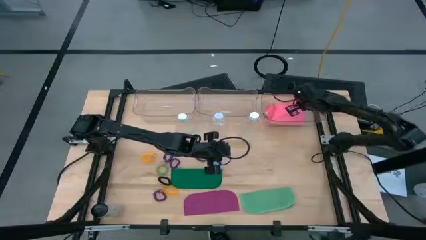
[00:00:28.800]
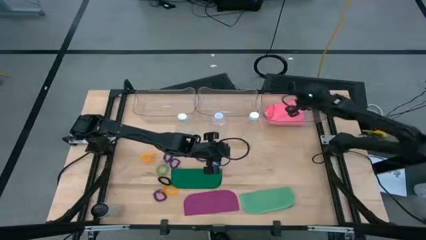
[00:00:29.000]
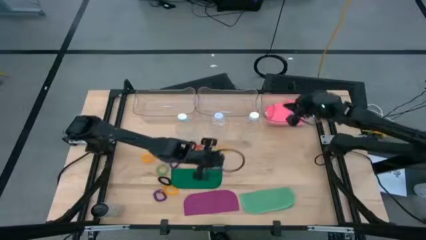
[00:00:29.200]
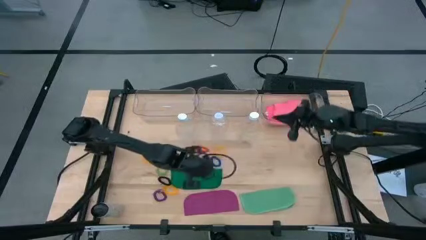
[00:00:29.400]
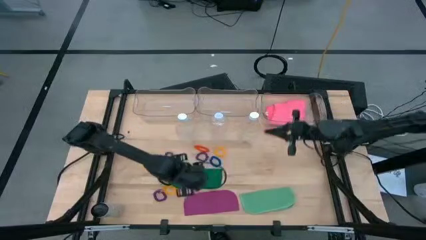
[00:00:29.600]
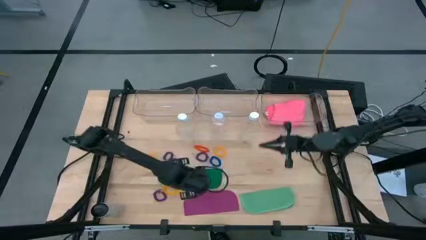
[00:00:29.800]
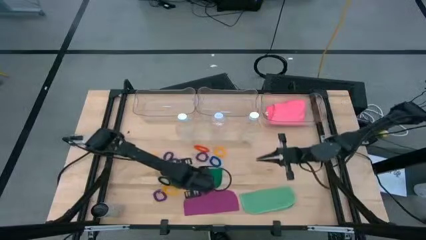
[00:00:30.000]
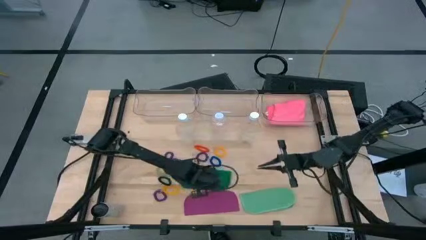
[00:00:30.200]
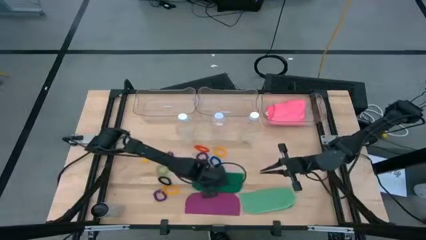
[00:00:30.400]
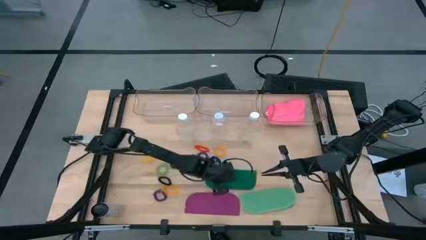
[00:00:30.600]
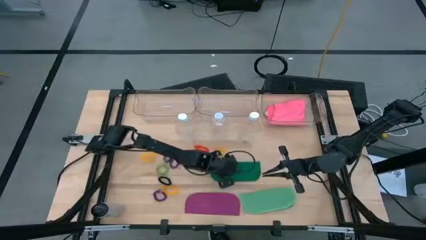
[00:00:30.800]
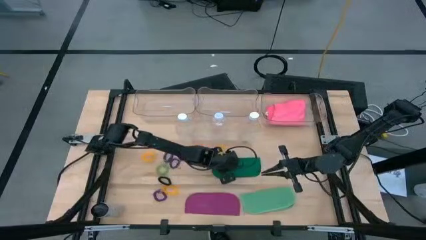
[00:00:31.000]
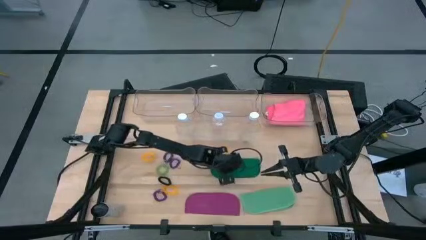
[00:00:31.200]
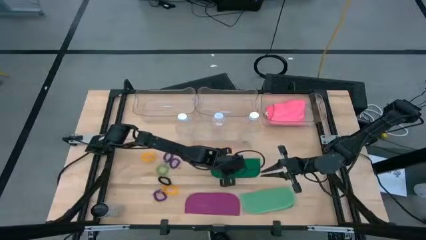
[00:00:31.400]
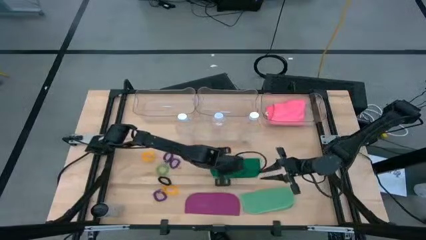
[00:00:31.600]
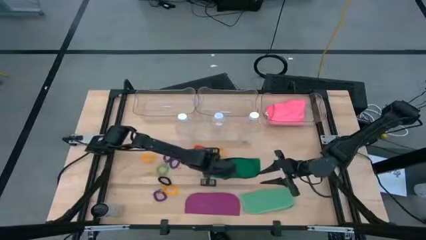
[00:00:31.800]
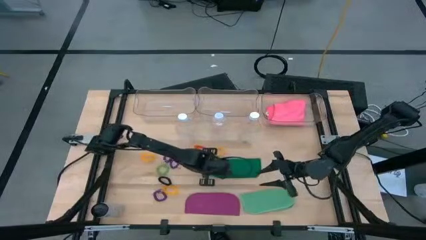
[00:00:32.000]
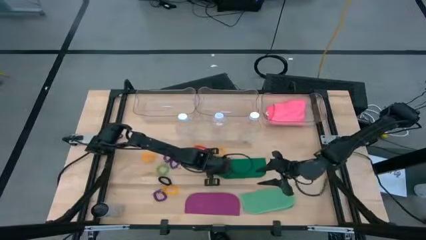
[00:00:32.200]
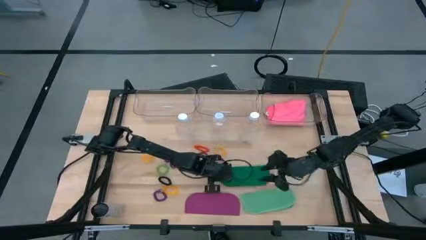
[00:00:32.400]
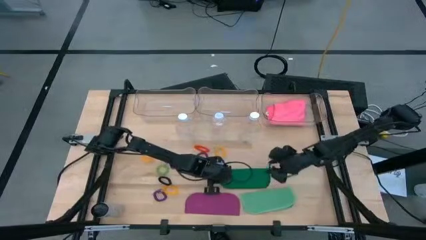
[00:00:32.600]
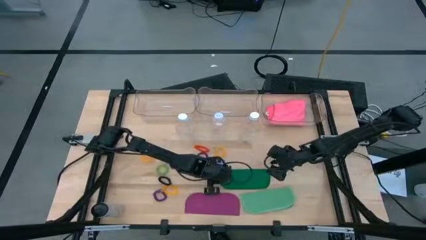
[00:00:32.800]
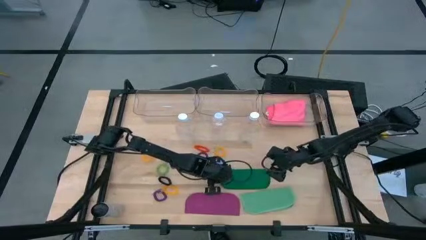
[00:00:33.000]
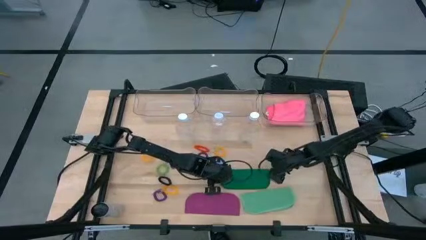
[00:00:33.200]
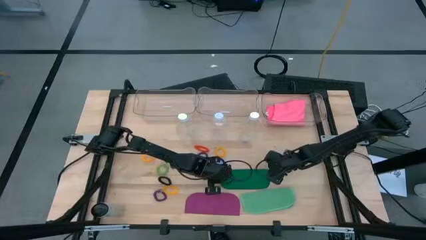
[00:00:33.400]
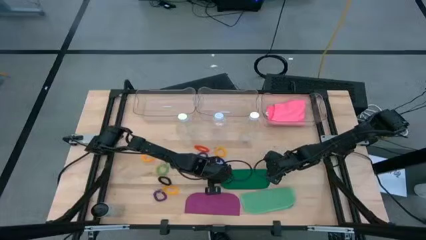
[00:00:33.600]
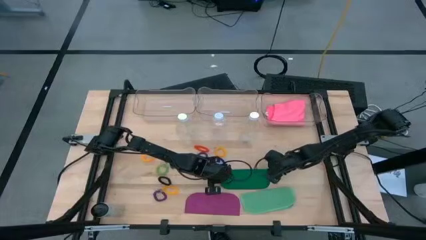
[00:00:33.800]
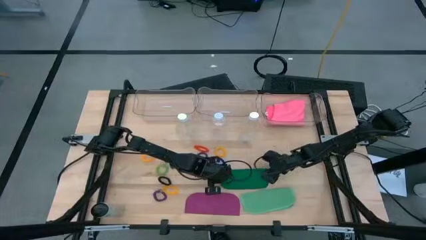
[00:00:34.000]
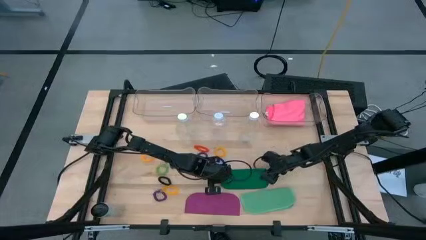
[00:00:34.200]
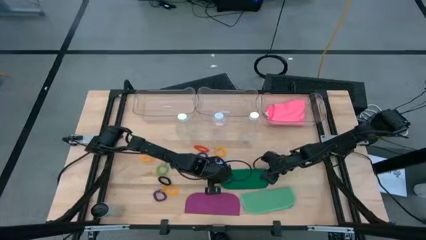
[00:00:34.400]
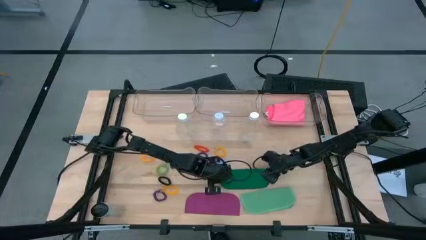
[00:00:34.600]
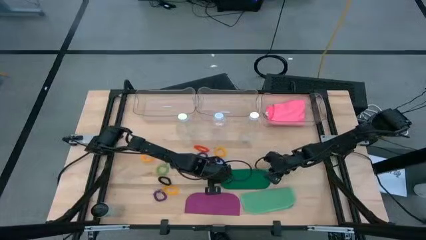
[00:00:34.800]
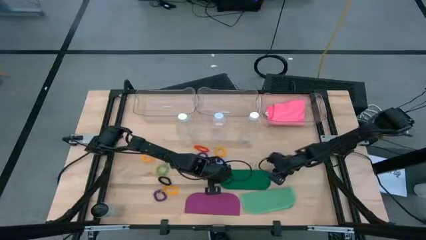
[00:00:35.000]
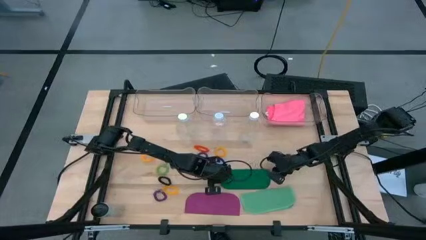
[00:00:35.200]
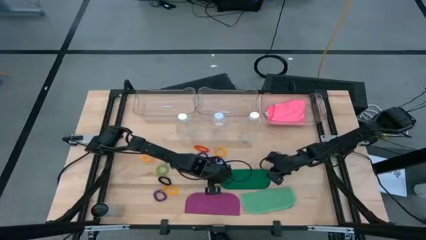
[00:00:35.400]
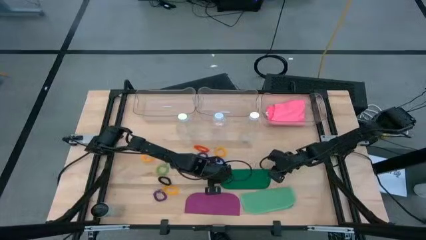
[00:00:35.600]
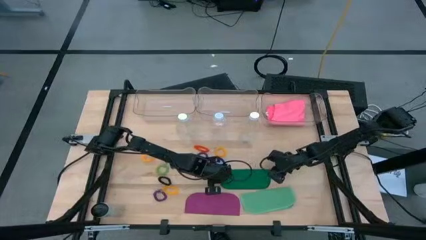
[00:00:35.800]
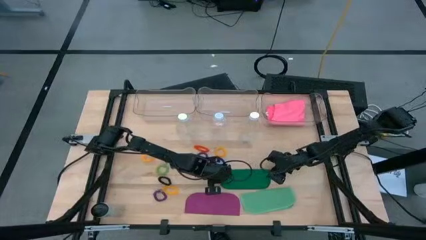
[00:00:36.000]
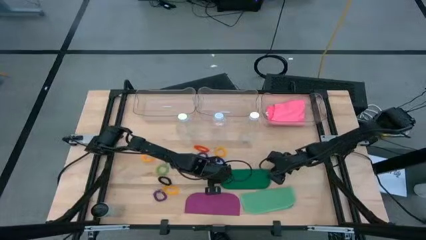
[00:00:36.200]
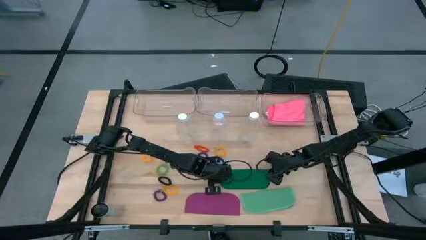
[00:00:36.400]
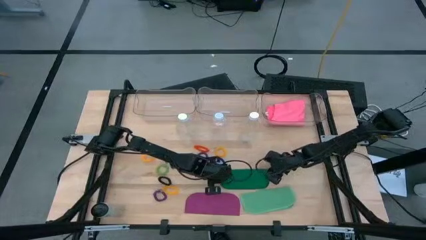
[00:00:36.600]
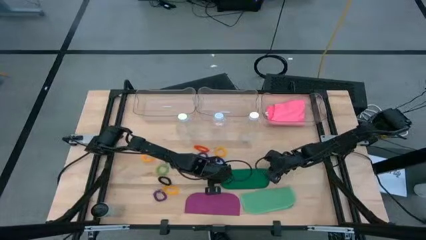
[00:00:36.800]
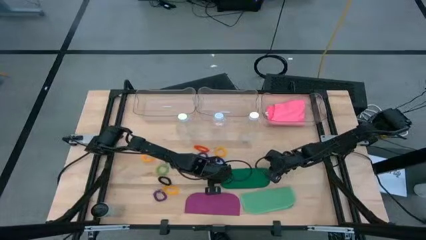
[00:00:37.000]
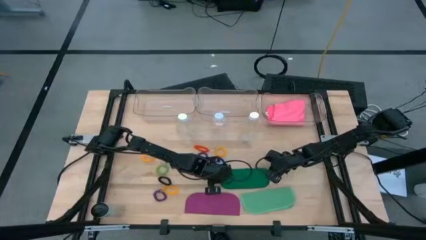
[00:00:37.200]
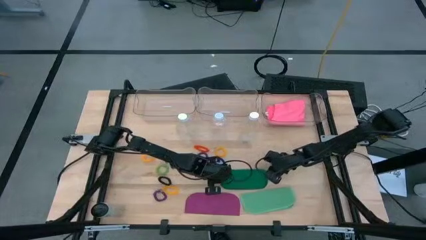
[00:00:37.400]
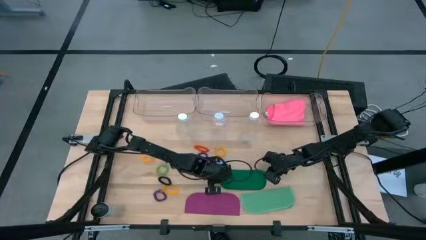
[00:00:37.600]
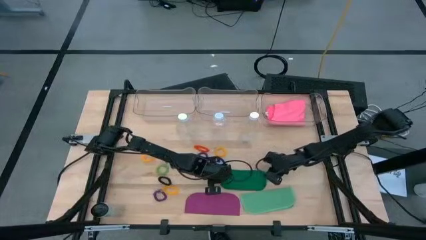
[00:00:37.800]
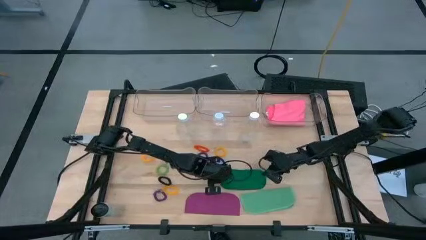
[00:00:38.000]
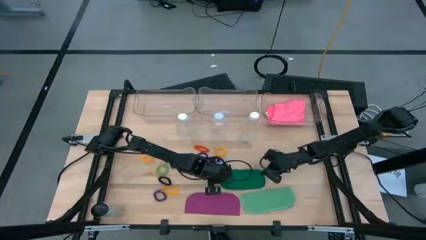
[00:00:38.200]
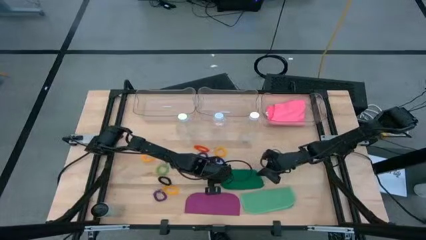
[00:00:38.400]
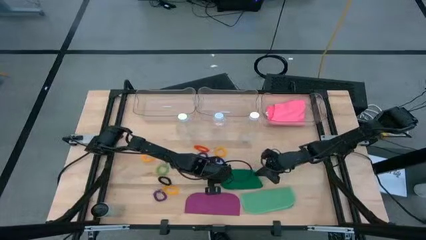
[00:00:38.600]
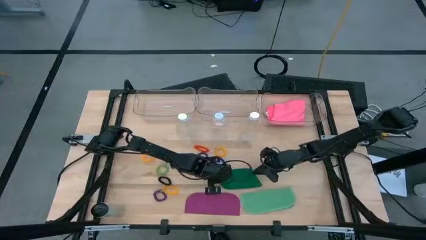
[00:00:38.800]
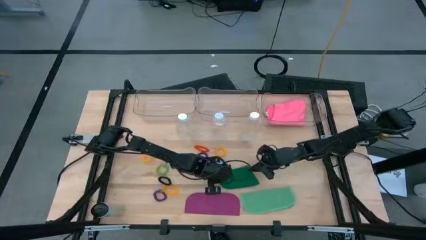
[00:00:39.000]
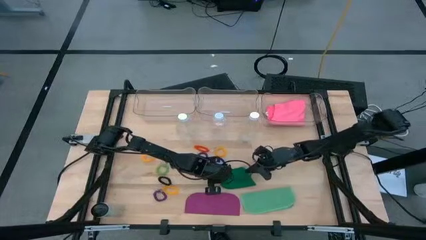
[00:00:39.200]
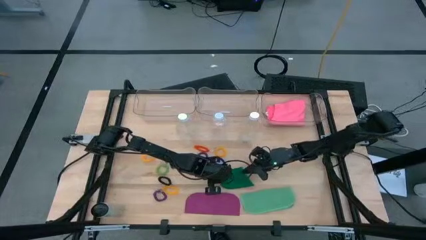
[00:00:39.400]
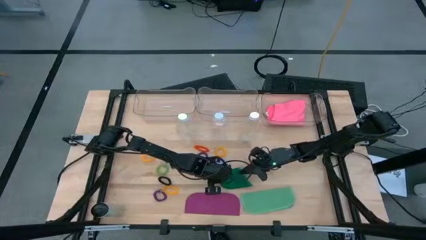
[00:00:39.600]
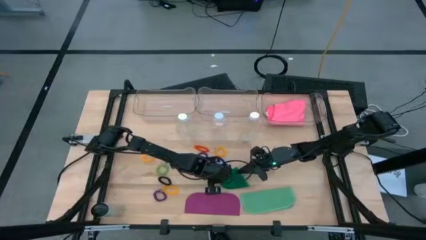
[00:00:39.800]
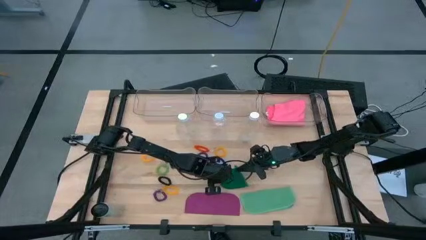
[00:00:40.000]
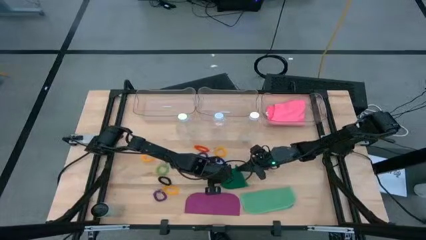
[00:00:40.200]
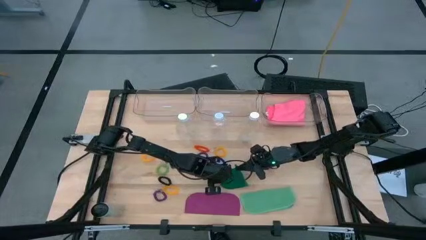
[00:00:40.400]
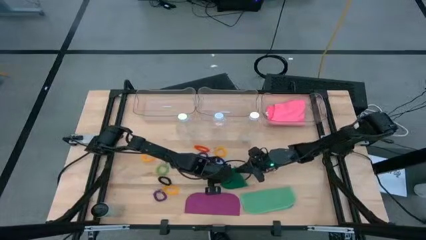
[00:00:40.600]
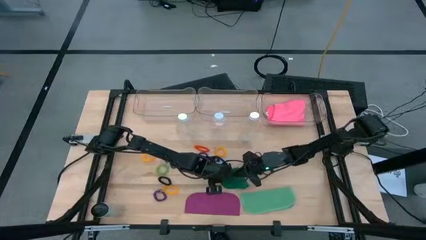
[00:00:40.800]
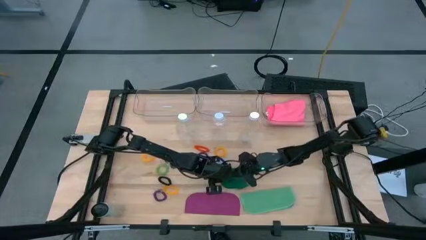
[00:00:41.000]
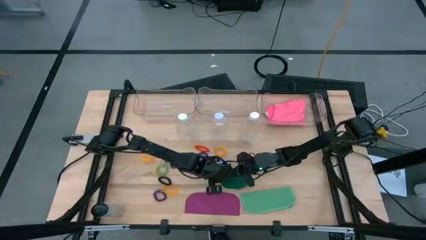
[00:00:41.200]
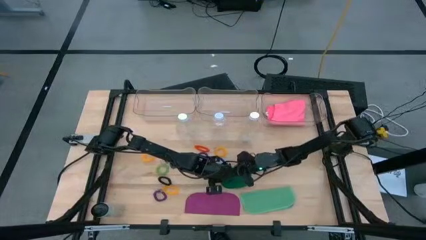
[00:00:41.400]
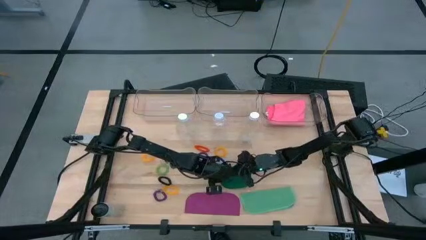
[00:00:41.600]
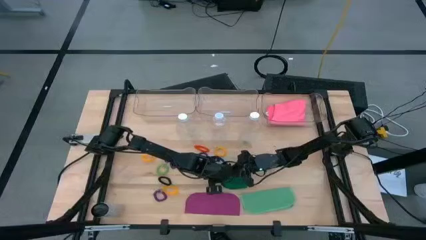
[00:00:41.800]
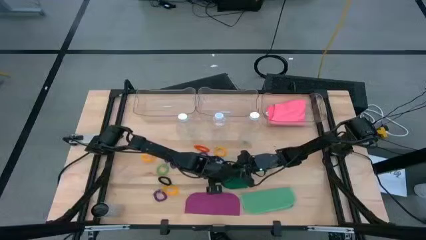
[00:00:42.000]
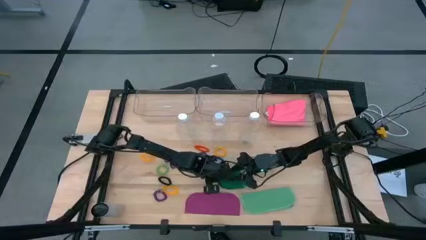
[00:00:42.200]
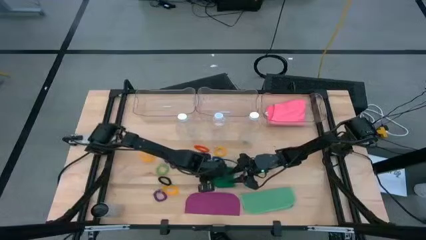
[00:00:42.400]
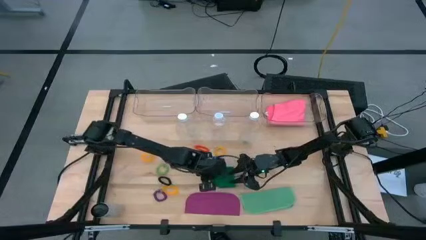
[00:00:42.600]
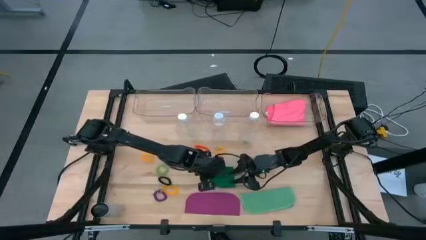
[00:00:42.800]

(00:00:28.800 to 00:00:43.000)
Task: Pick & Place Sports Items
Fold the green microfiber towel
